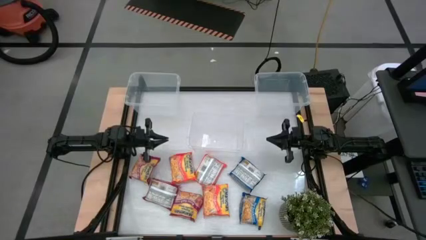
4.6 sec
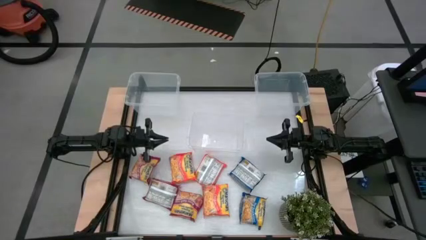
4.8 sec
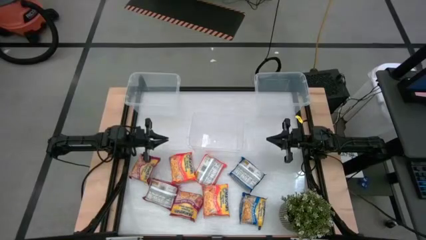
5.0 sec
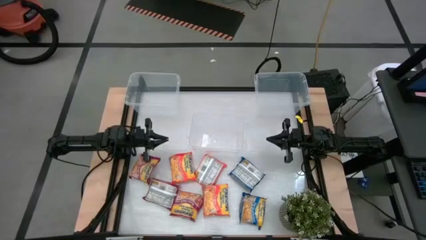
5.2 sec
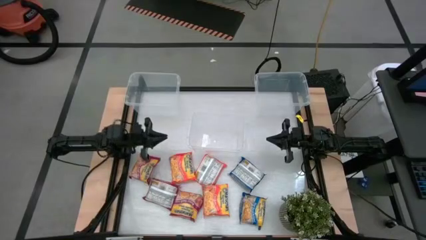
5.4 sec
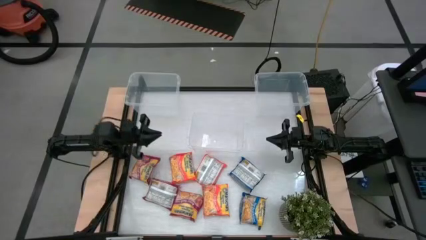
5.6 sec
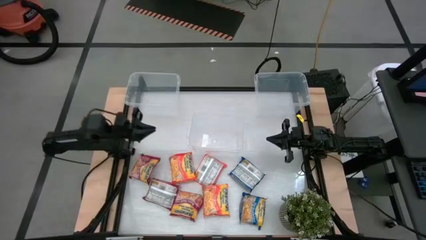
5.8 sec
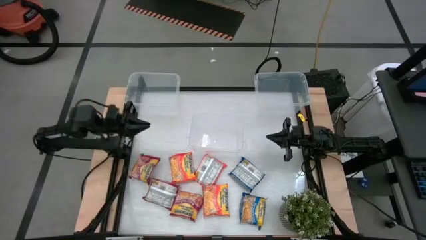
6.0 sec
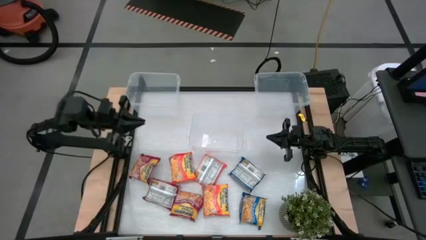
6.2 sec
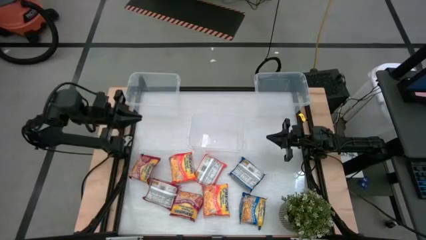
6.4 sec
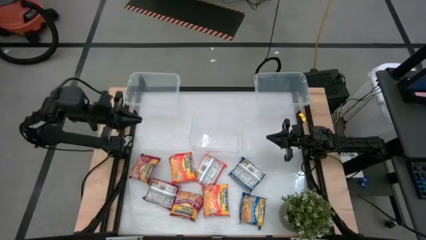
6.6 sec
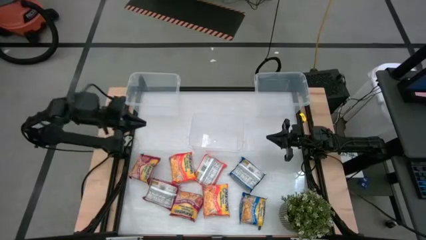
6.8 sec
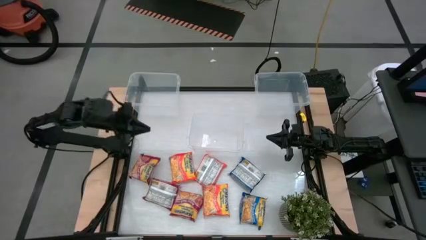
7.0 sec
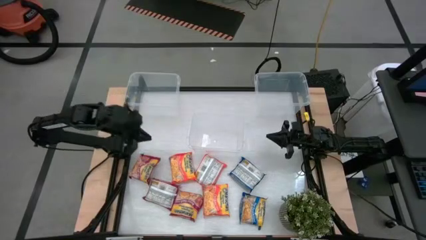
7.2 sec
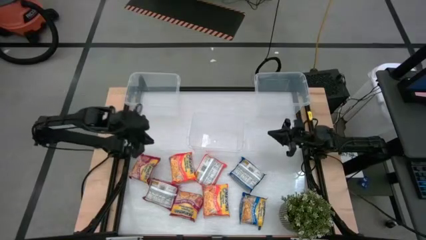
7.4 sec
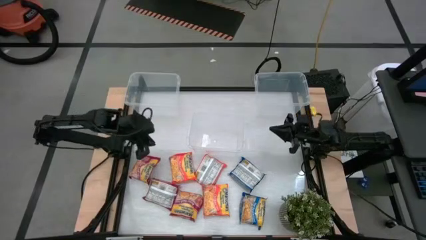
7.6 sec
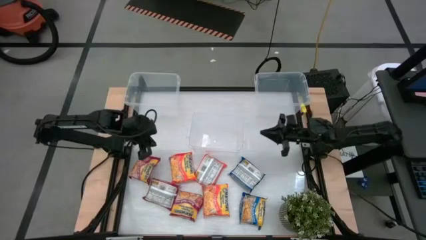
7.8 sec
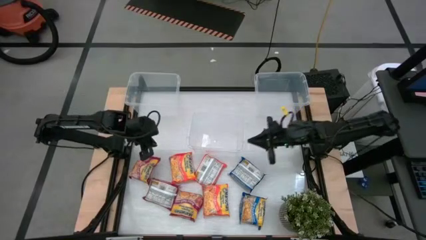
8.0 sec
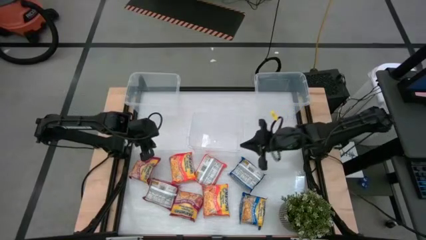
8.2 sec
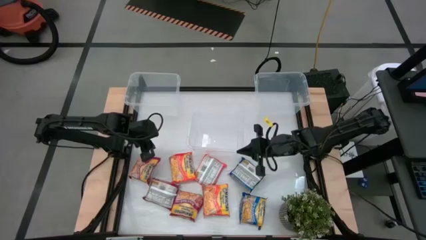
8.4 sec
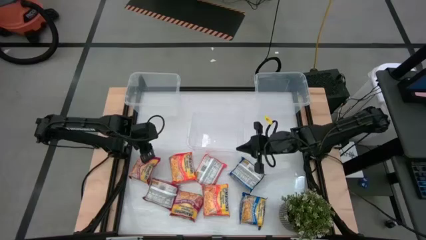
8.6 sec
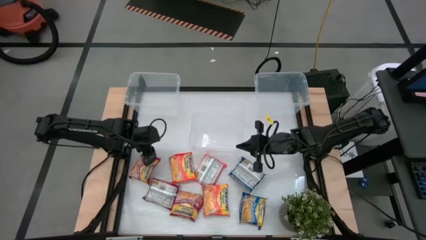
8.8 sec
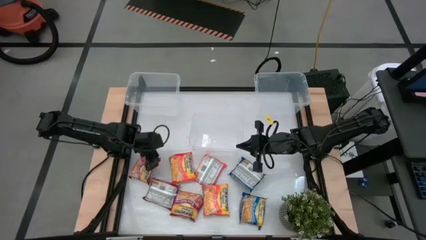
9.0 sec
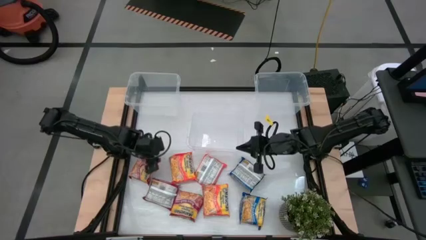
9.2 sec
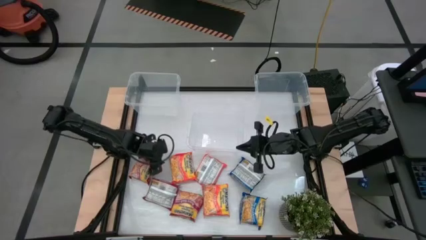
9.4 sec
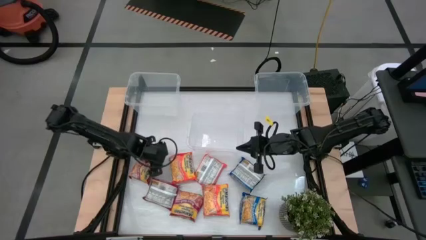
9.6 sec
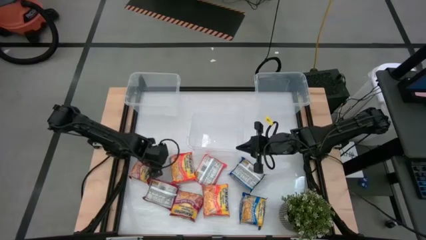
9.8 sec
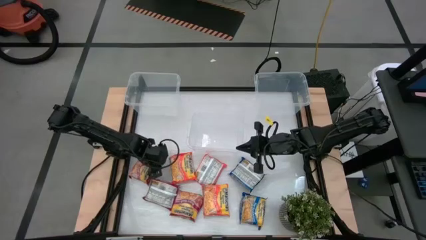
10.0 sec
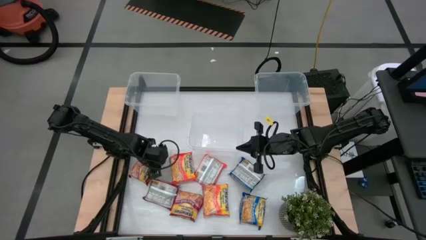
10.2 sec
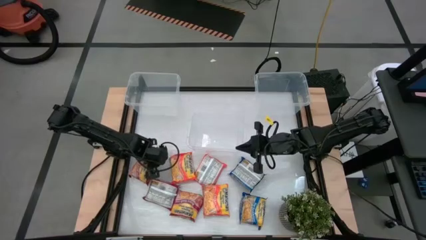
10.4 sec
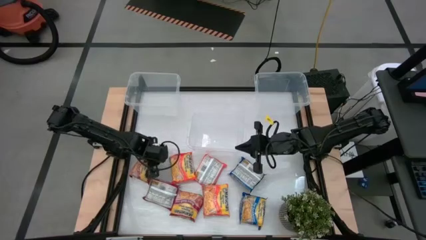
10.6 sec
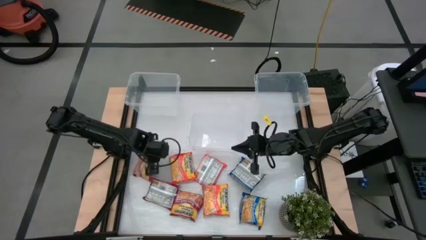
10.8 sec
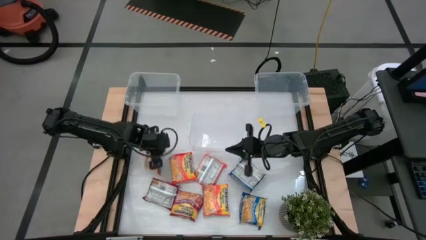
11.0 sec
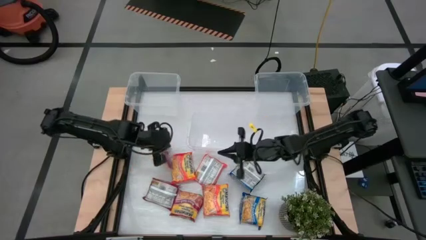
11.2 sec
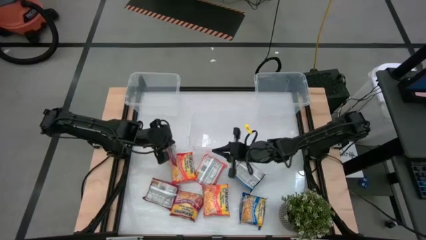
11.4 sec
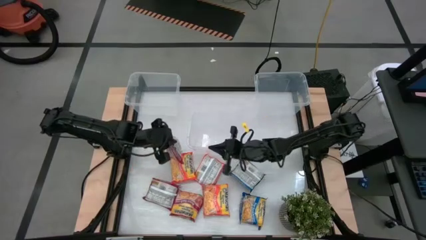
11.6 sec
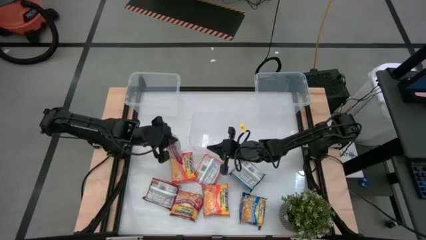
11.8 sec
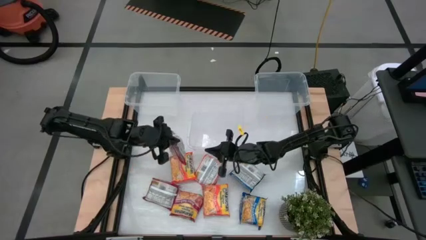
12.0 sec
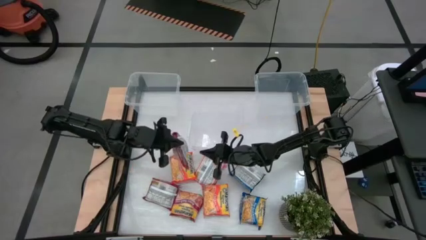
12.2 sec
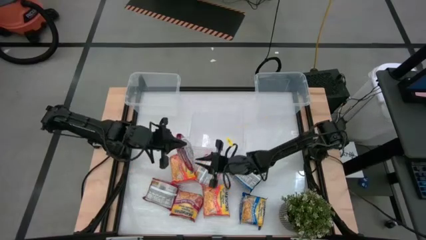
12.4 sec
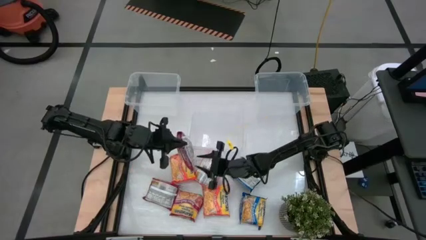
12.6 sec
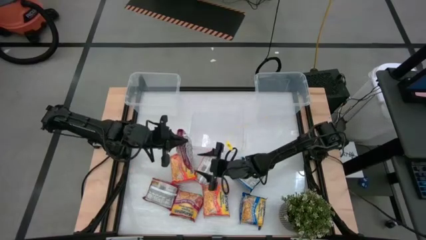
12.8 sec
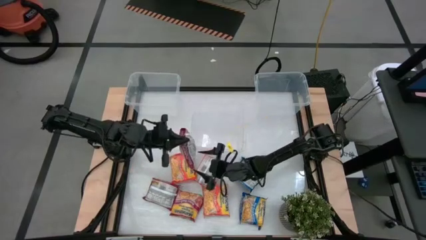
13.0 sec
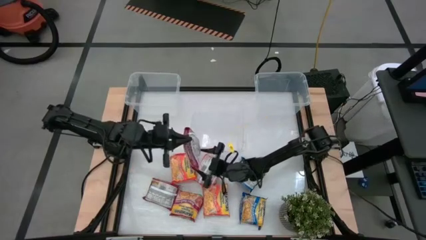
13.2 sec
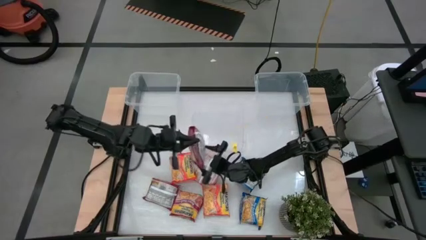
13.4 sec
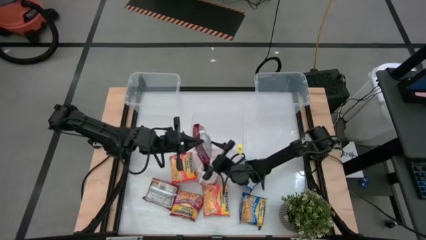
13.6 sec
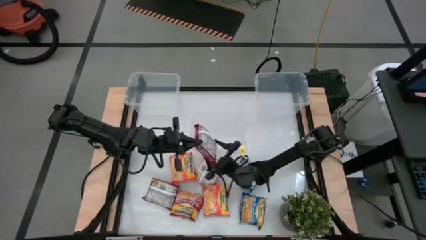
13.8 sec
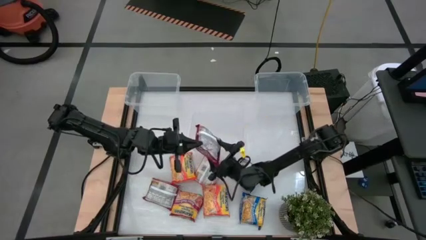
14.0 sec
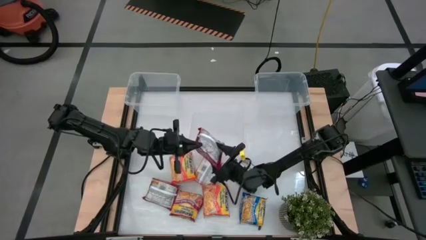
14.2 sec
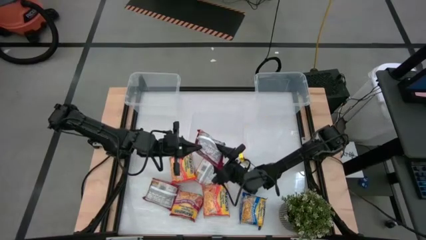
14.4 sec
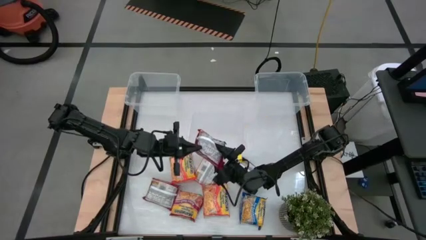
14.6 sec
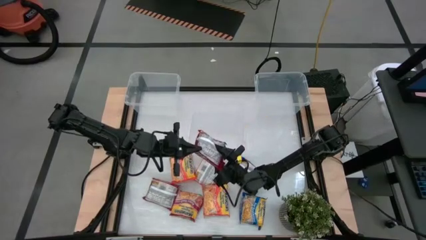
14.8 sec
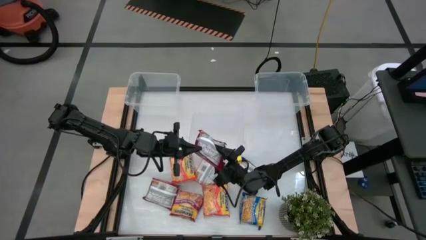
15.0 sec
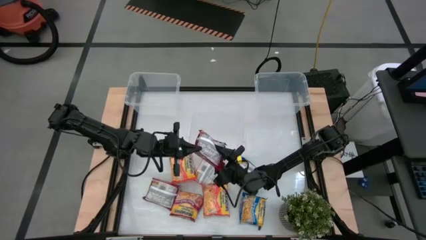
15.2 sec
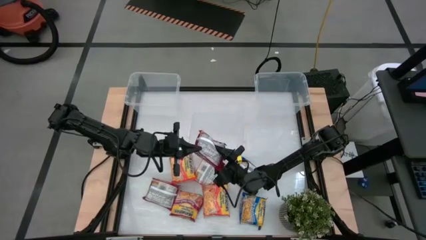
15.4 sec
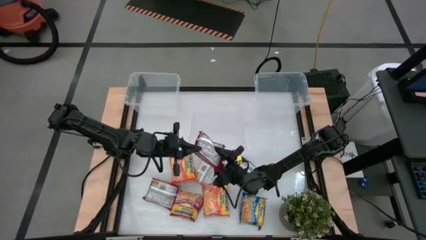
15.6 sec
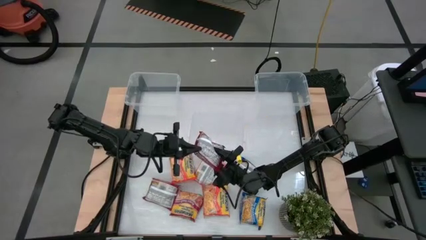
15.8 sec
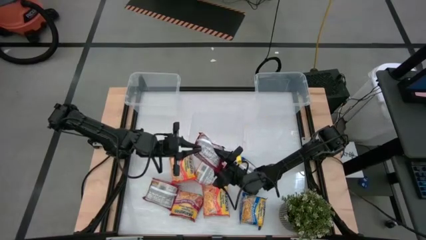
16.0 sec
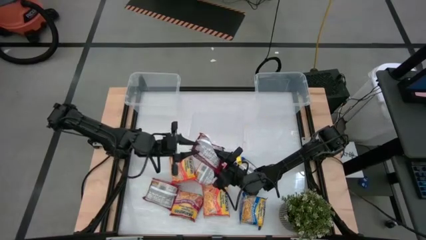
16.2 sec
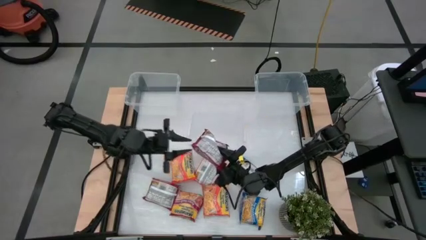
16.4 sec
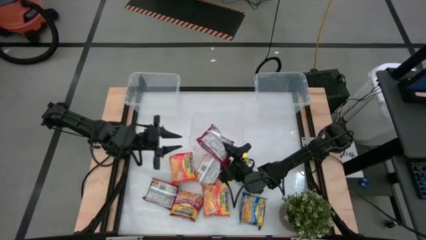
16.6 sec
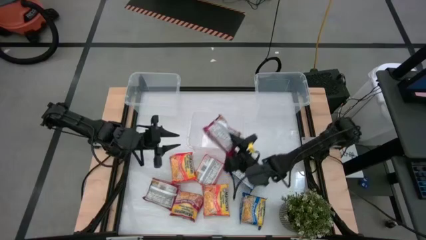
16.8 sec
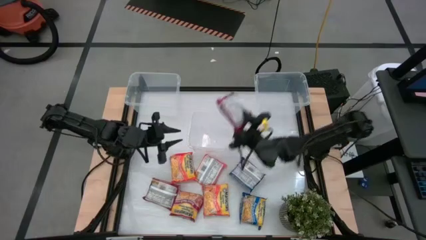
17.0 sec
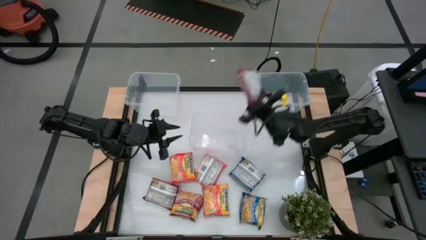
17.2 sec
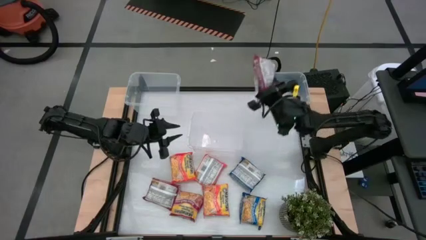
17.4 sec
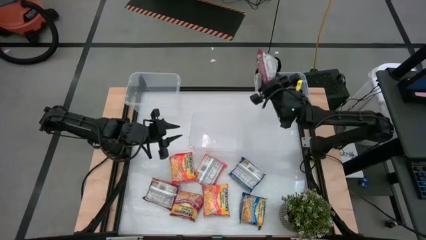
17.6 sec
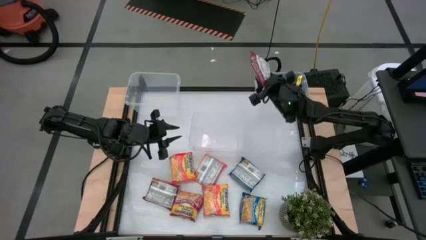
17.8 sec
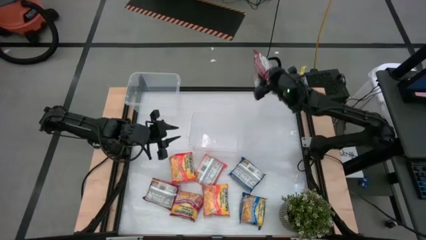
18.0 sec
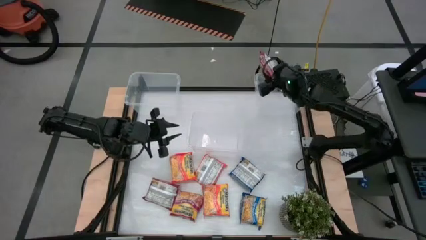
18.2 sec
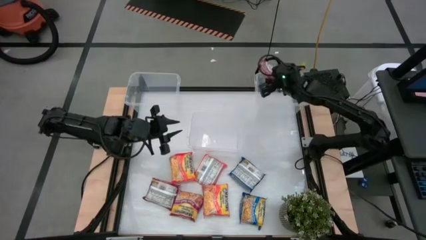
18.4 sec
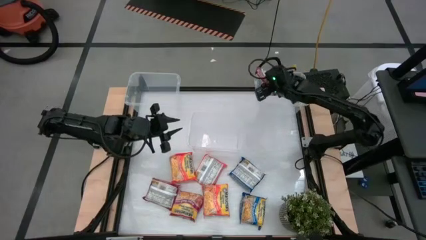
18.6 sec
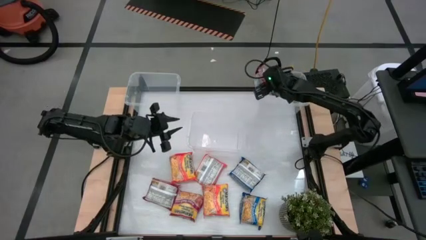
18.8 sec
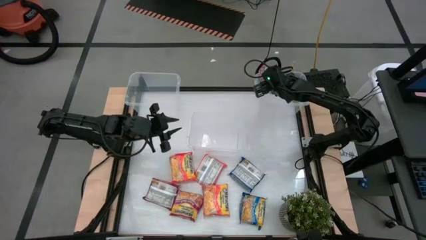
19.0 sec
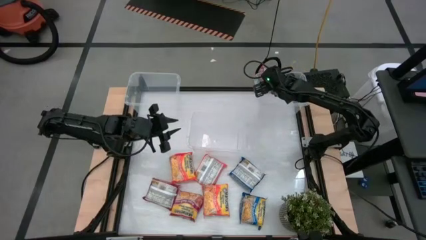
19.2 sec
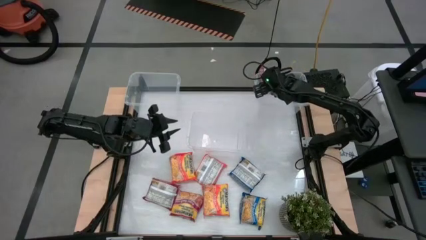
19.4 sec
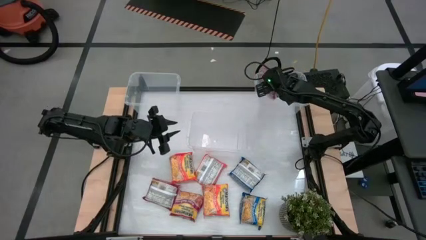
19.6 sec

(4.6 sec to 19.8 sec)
Task: Sort Maruchan noodles
Put the left red noodle pack into the top right transparent bin
